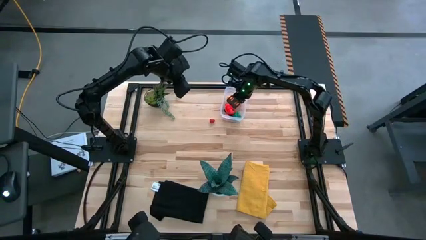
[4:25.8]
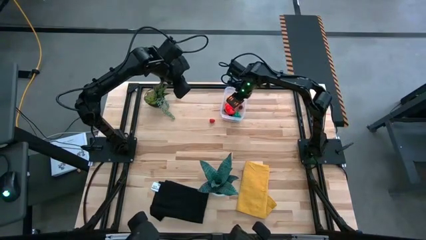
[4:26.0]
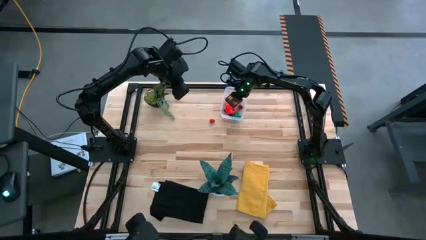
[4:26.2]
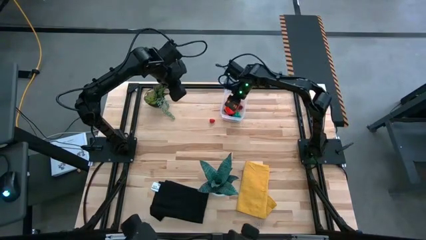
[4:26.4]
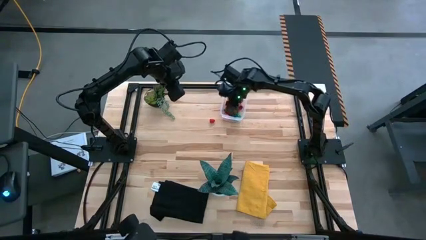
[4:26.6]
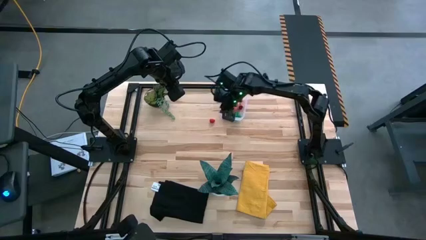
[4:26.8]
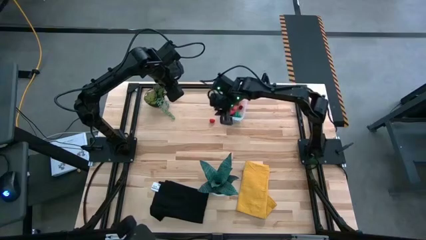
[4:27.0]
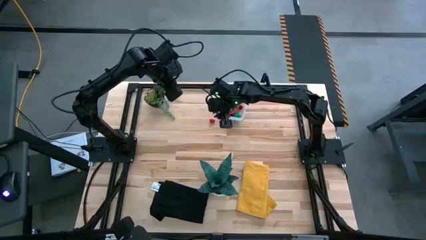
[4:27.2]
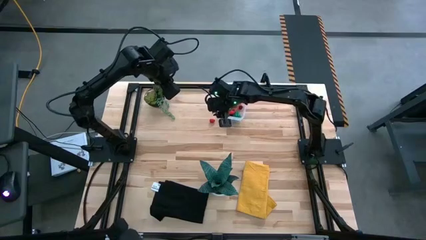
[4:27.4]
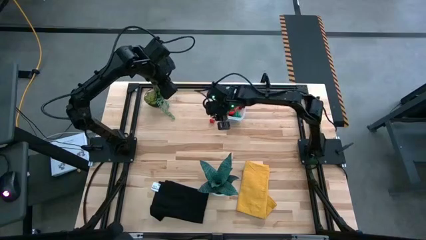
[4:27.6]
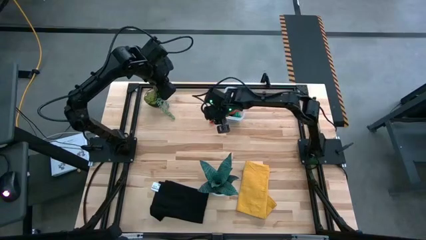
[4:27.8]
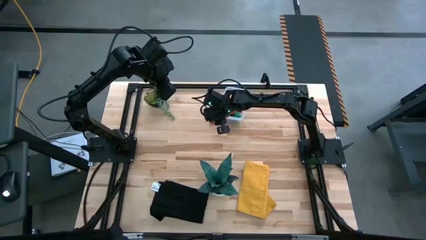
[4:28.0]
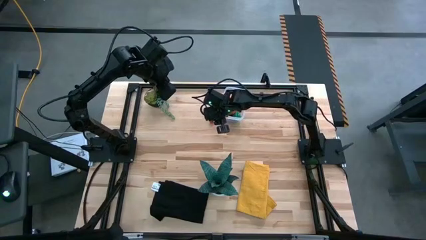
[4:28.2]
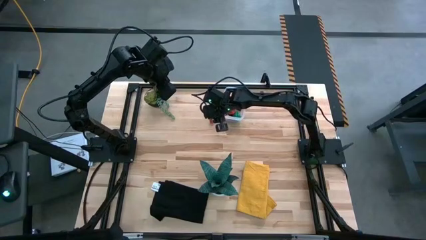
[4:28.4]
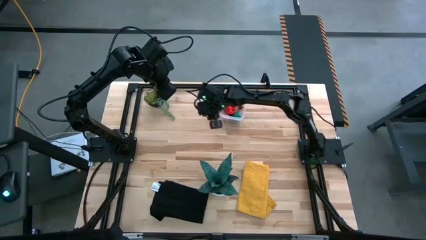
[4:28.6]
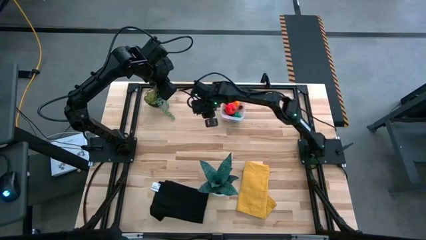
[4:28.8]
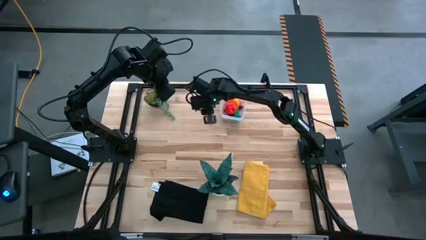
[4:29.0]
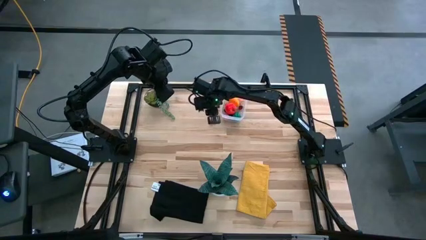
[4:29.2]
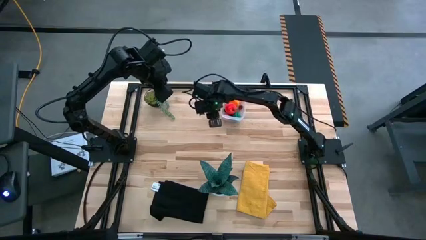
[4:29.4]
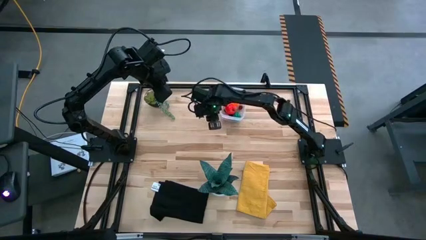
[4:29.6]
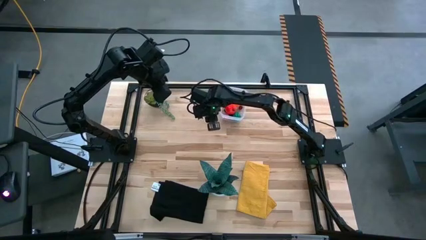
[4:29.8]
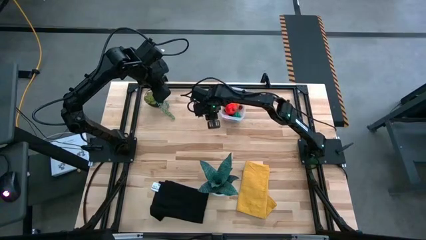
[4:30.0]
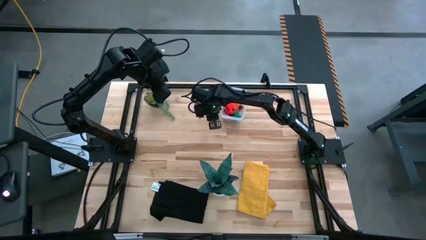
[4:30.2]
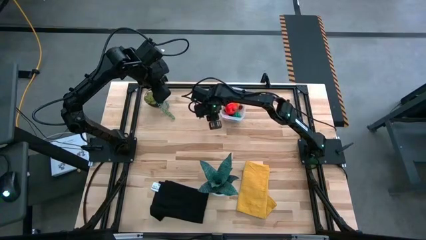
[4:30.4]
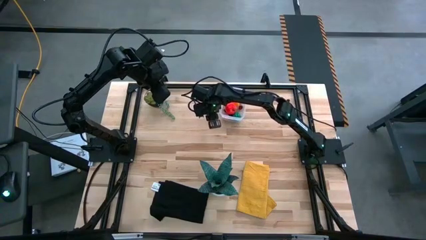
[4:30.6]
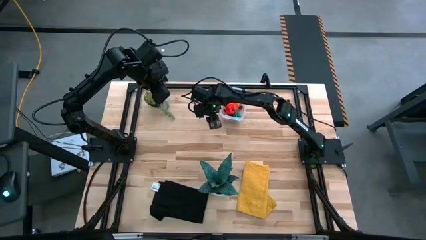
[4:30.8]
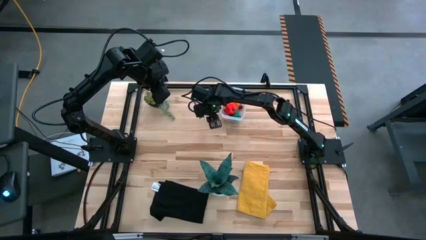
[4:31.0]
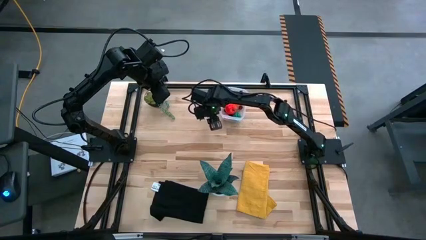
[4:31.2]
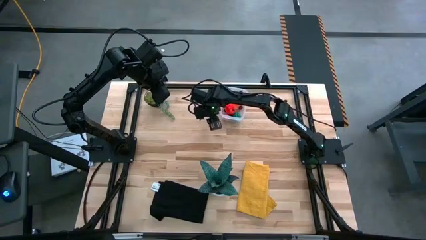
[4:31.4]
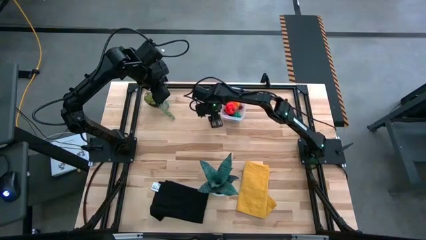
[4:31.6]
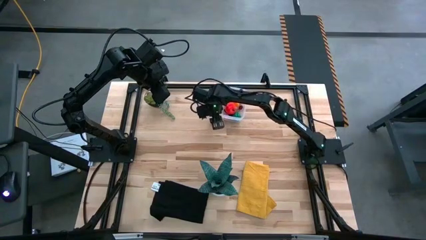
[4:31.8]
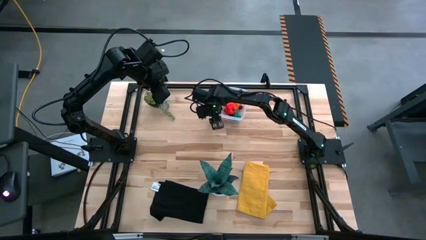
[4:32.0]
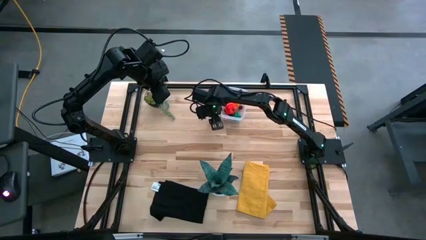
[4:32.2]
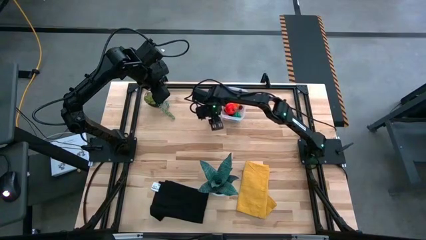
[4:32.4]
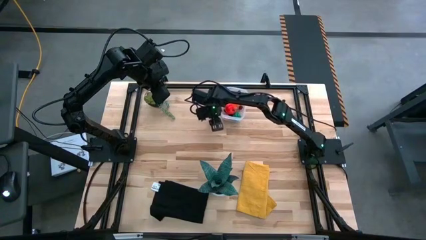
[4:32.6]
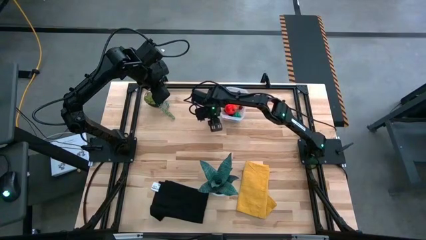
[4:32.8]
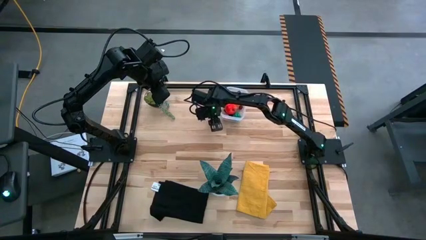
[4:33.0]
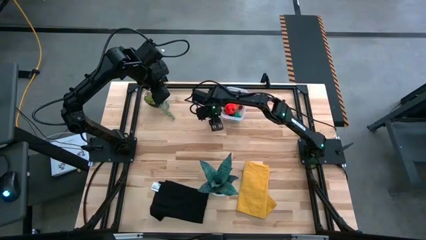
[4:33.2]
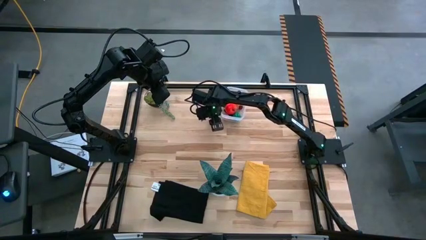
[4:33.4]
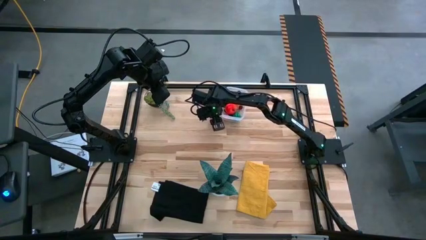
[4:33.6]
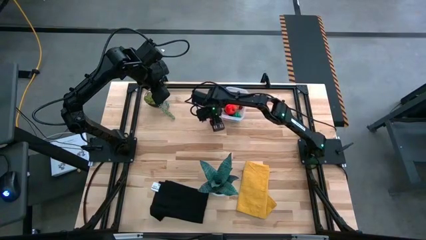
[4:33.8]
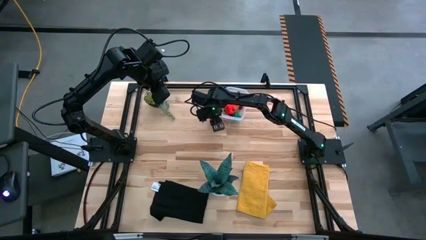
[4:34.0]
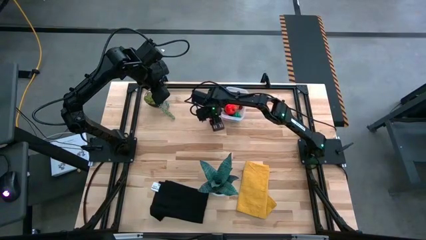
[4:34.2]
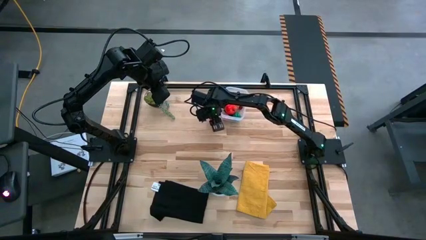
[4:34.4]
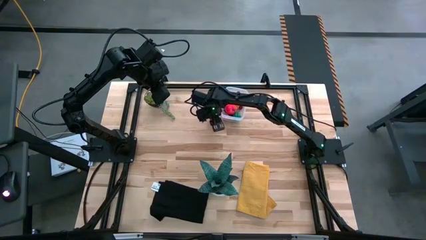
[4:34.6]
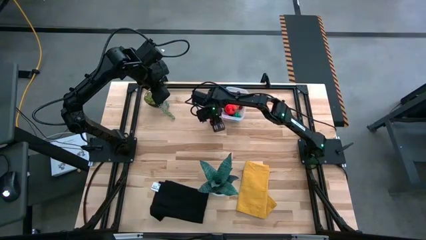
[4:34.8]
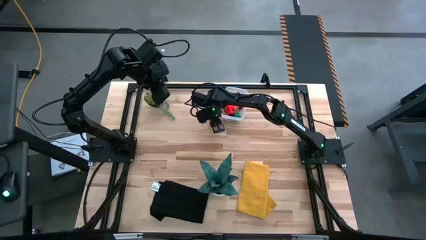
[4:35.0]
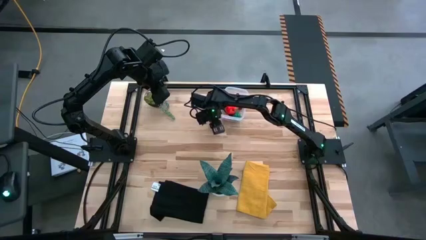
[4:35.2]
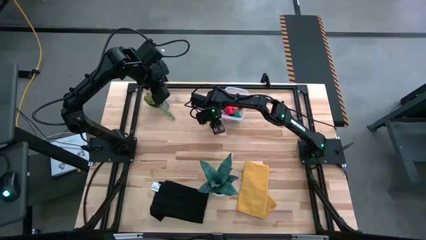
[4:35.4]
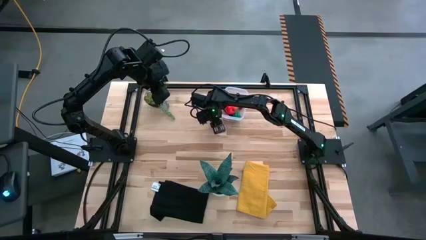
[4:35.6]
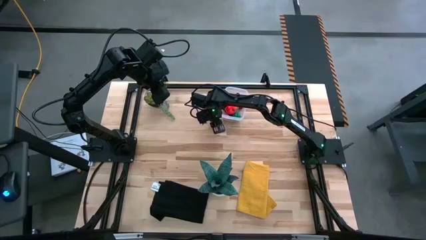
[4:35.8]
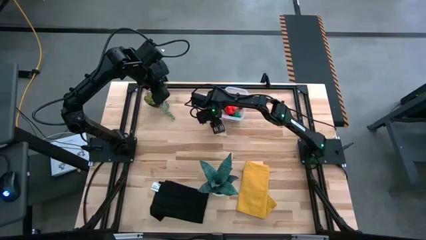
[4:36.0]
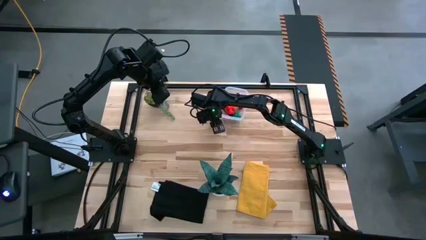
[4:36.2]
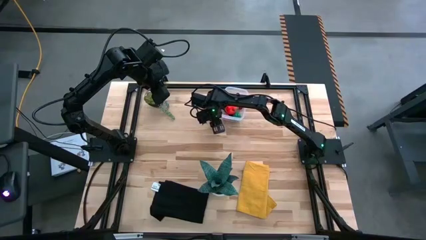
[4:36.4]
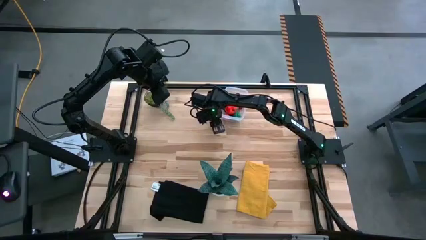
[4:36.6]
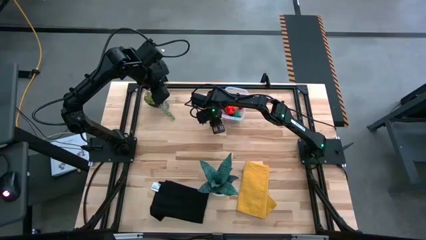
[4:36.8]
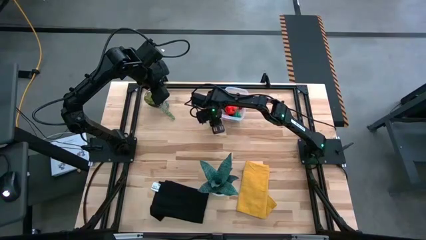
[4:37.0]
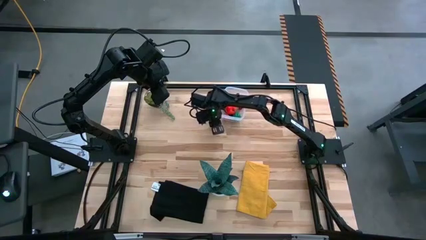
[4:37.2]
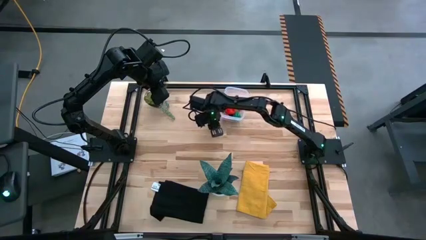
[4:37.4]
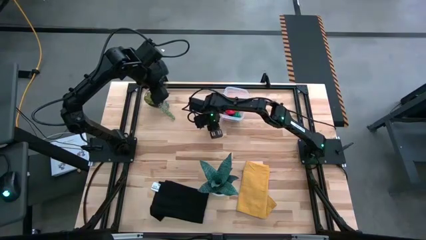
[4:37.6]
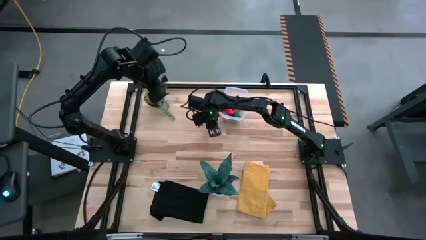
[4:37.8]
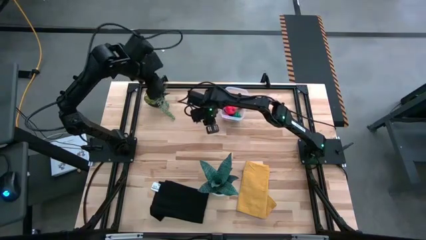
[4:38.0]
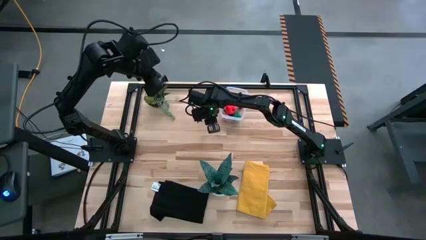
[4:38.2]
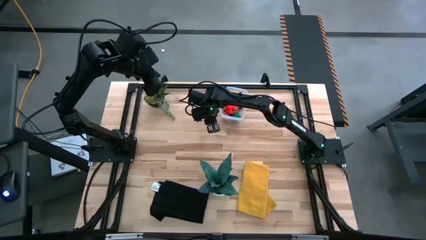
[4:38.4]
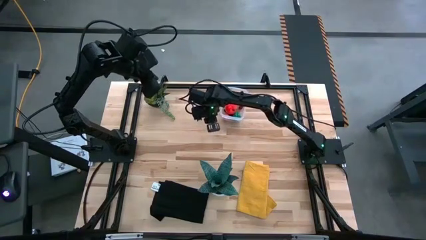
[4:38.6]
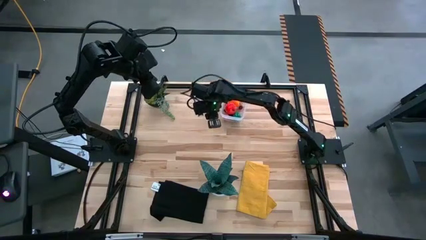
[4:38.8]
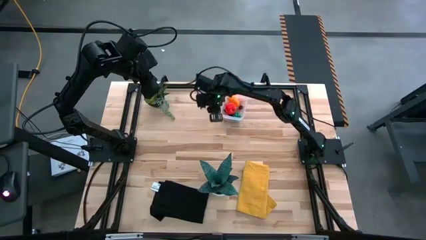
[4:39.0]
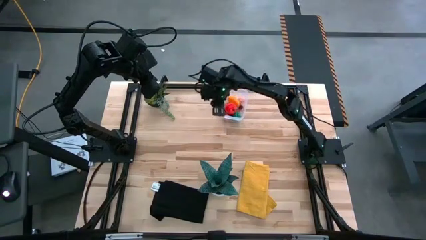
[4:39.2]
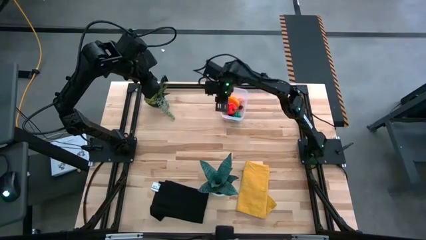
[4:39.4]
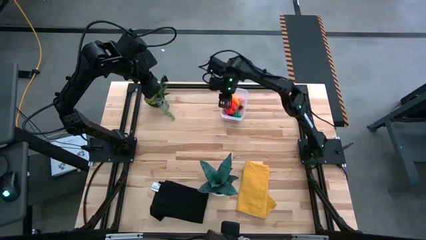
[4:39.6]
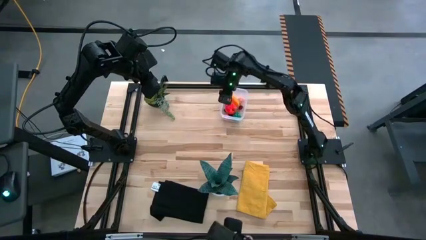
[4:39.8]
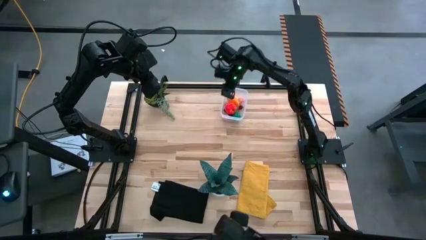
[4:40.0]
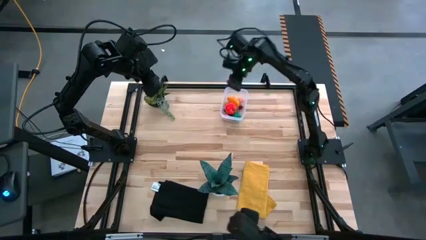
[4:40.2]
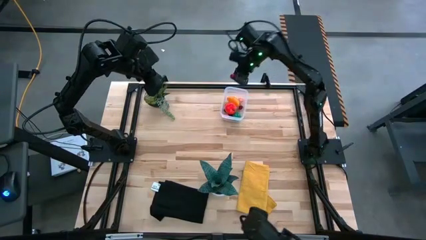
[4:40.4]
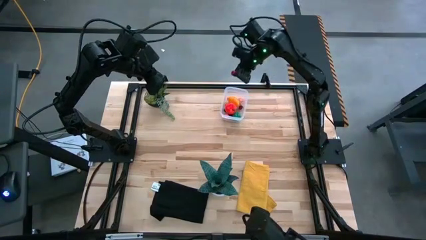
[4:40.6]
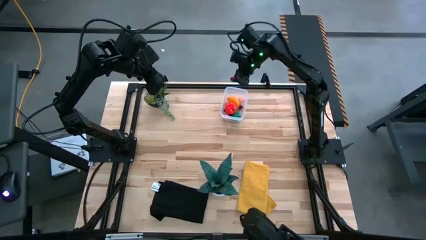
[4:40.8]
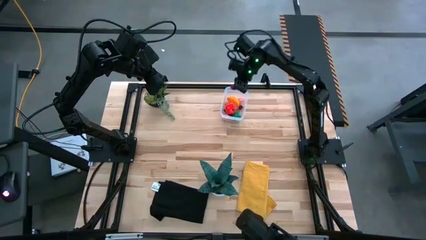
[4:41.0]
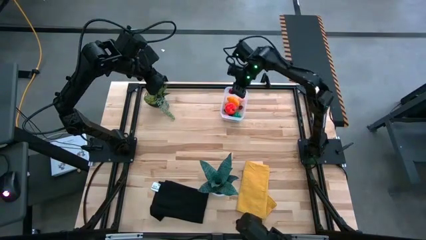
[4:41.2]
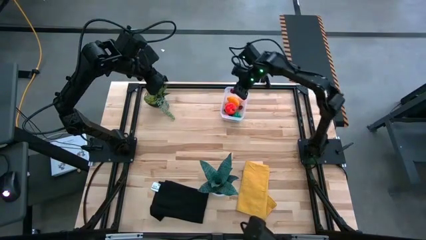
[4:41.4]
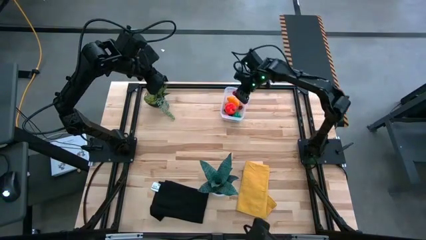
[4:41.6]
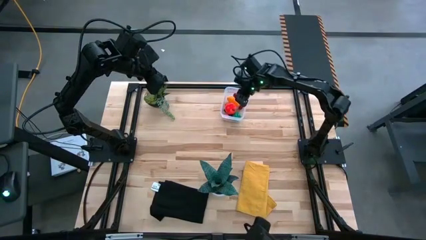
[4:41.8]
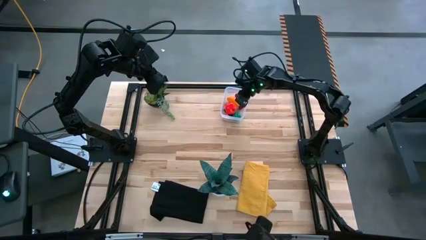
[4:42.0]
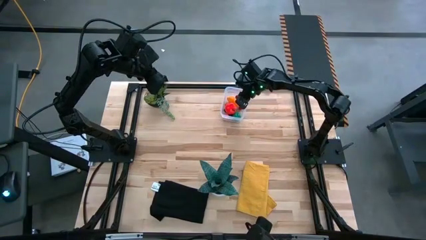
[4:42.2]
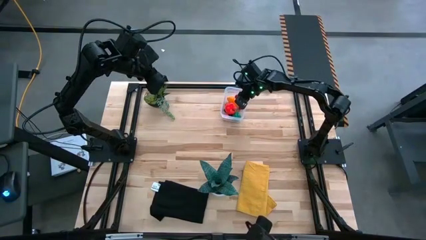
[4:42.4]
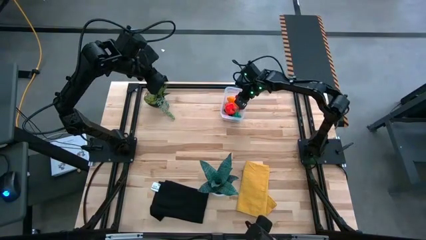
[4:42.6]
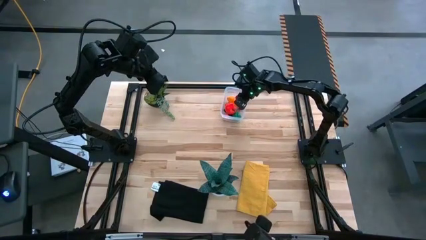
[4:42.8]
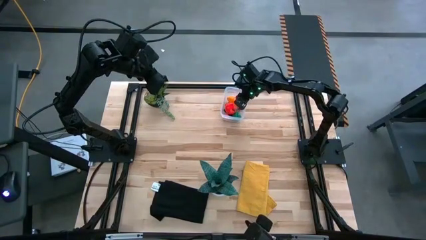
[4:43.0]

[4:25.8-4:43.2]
Task: Pick and placing Produce into tupperware
Put the raspberry into the transparent container
